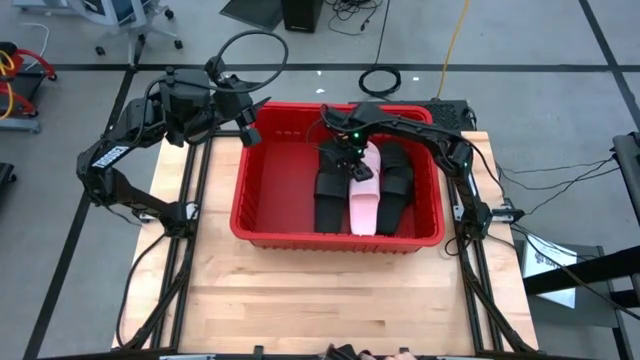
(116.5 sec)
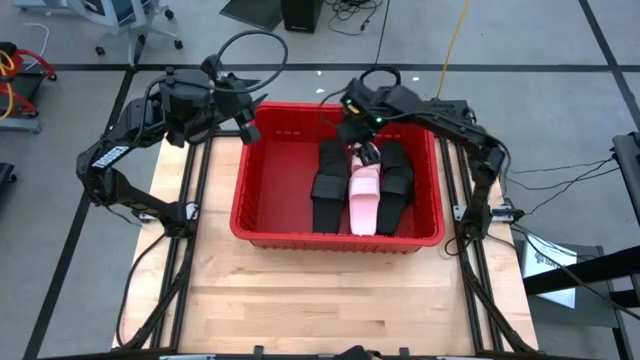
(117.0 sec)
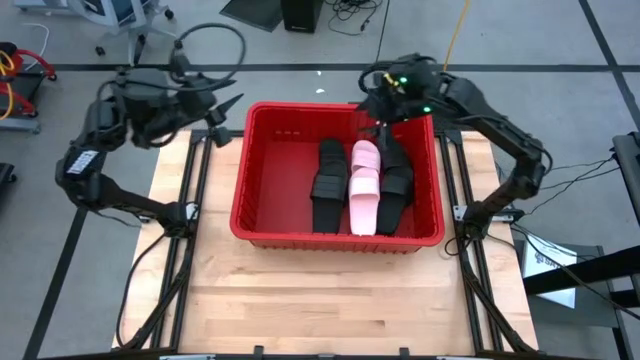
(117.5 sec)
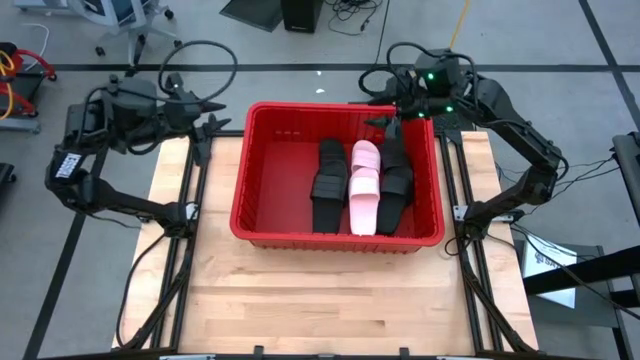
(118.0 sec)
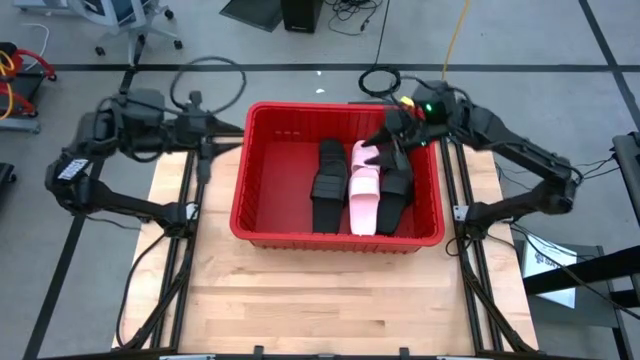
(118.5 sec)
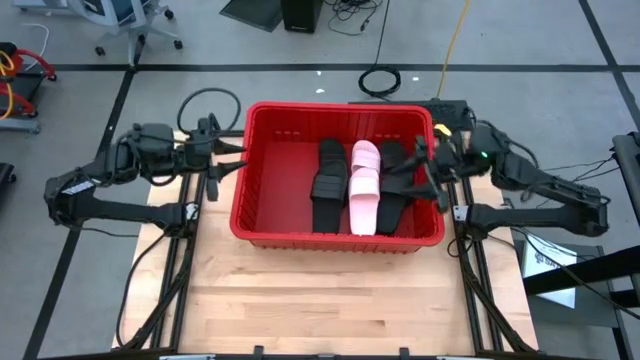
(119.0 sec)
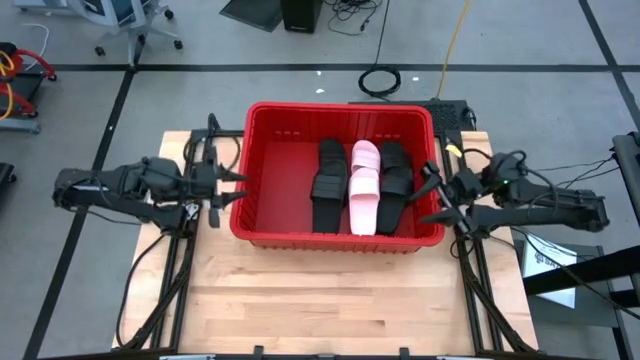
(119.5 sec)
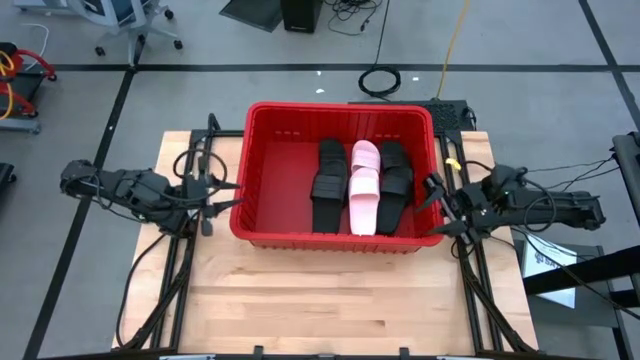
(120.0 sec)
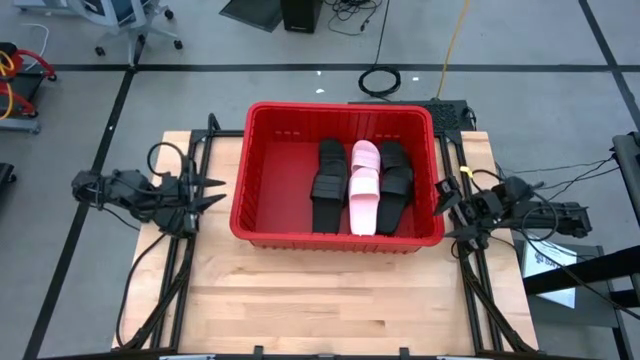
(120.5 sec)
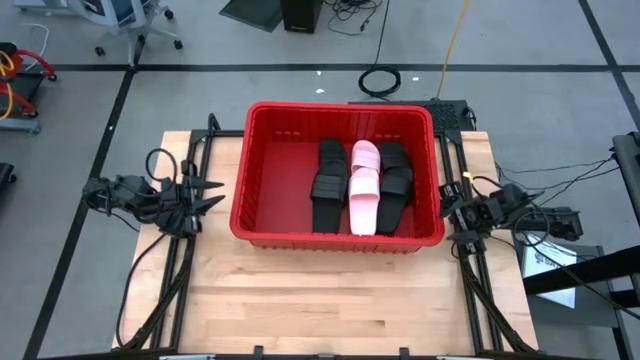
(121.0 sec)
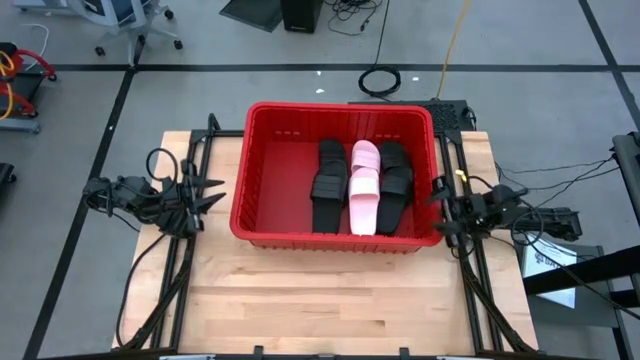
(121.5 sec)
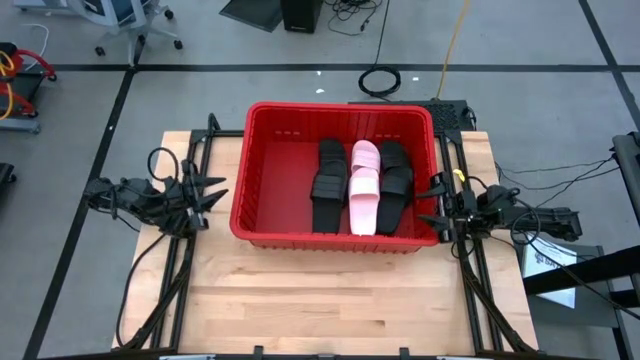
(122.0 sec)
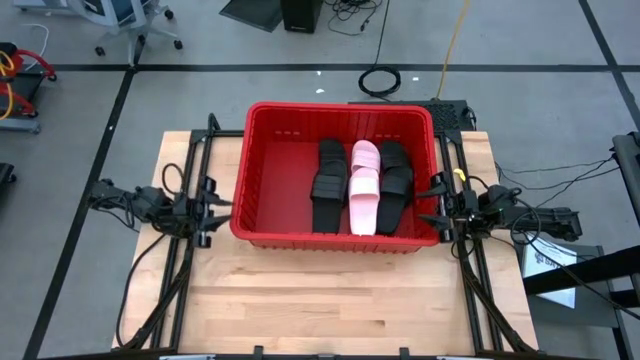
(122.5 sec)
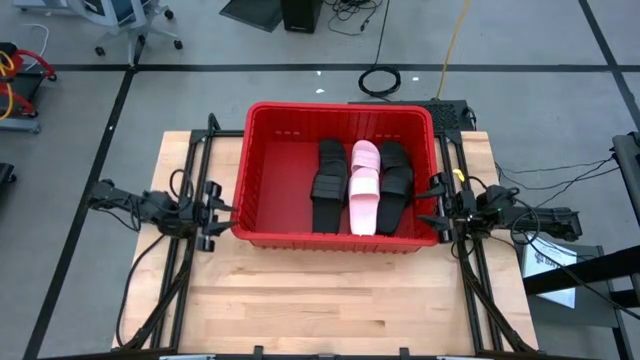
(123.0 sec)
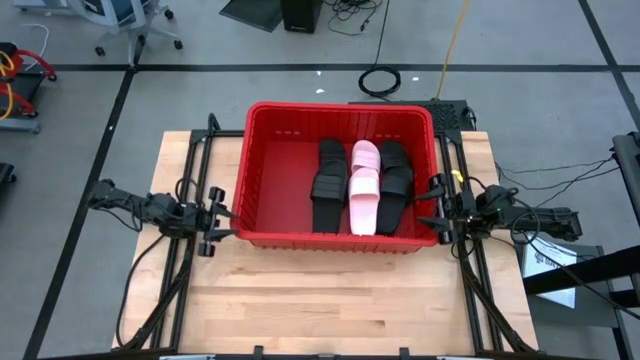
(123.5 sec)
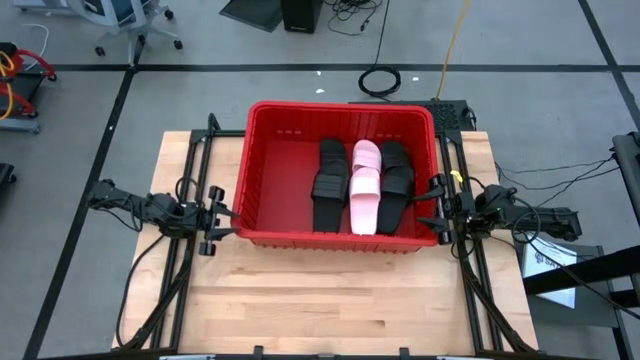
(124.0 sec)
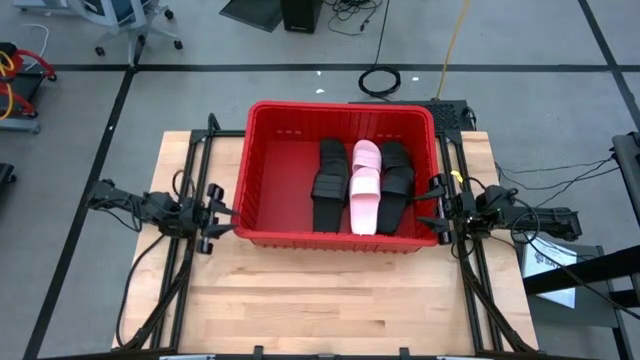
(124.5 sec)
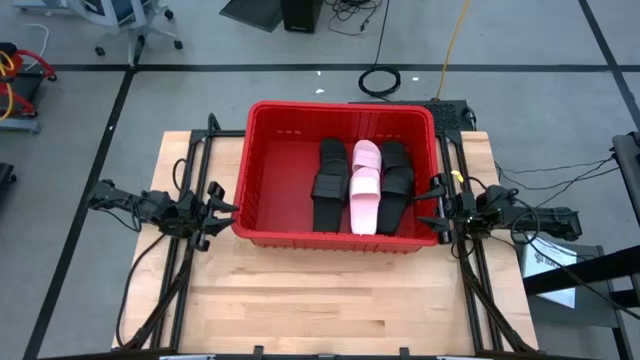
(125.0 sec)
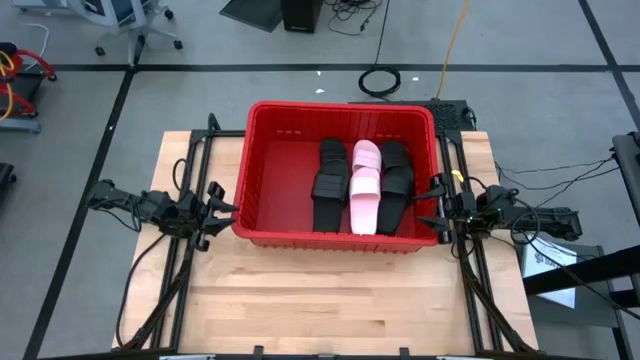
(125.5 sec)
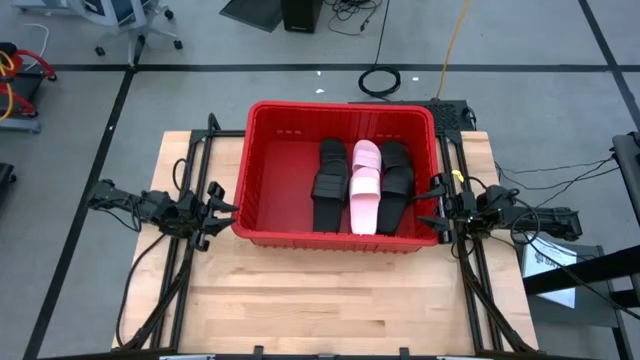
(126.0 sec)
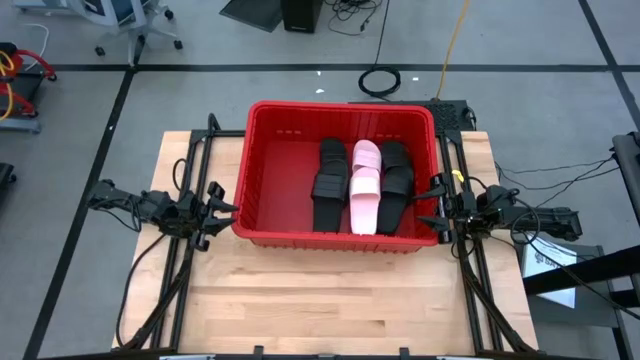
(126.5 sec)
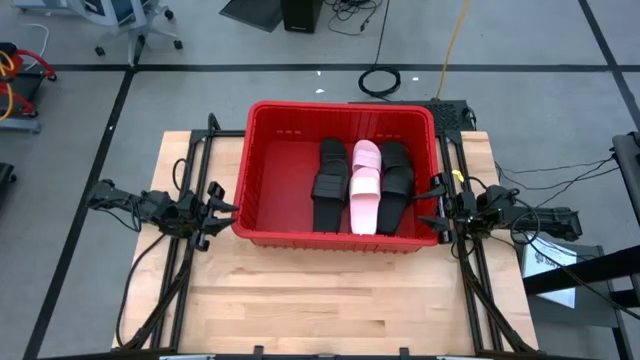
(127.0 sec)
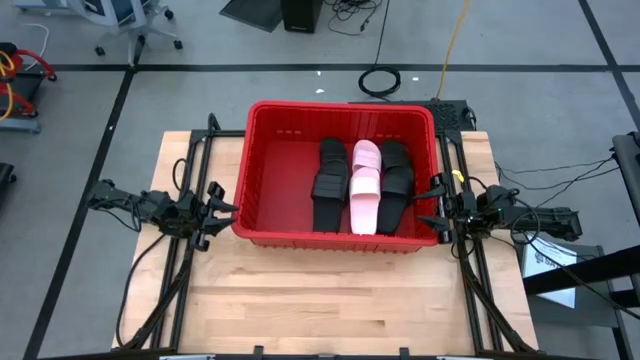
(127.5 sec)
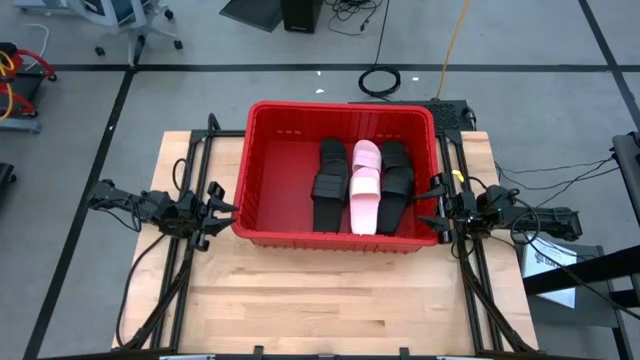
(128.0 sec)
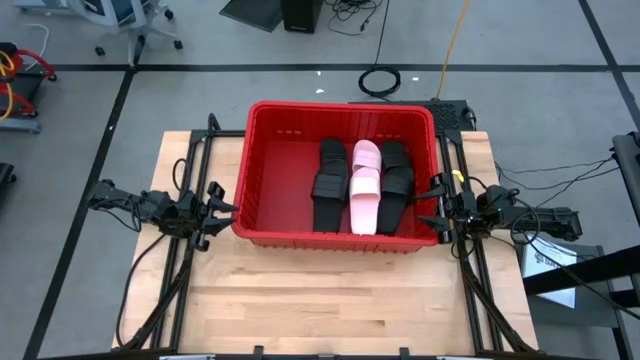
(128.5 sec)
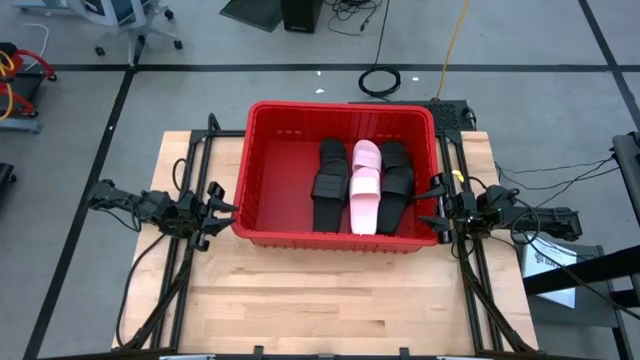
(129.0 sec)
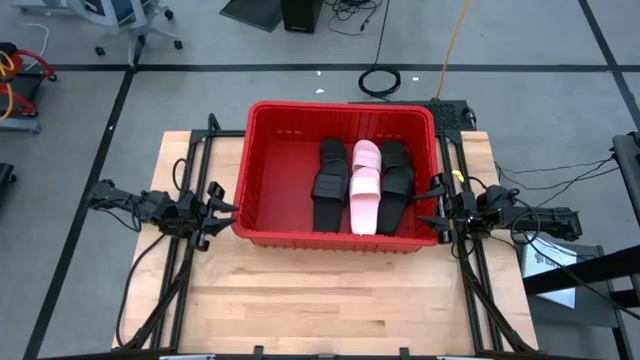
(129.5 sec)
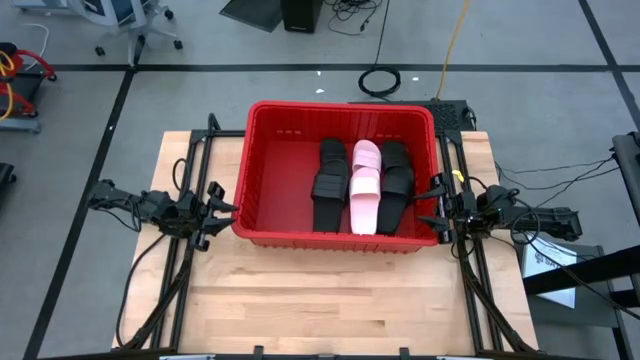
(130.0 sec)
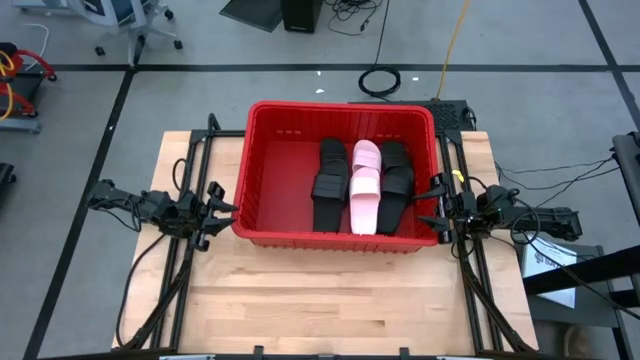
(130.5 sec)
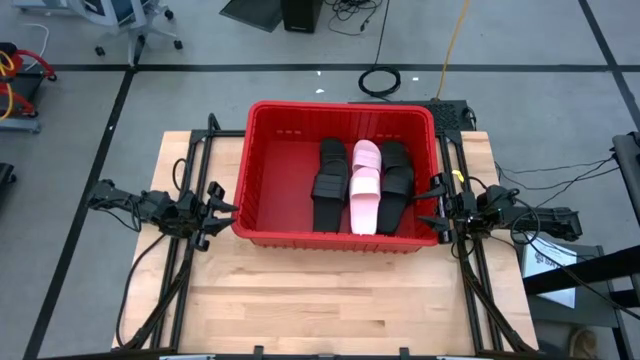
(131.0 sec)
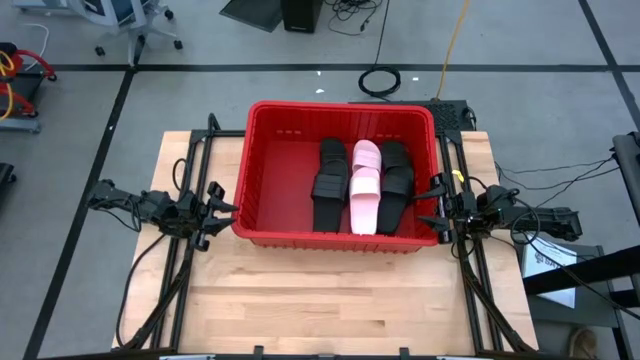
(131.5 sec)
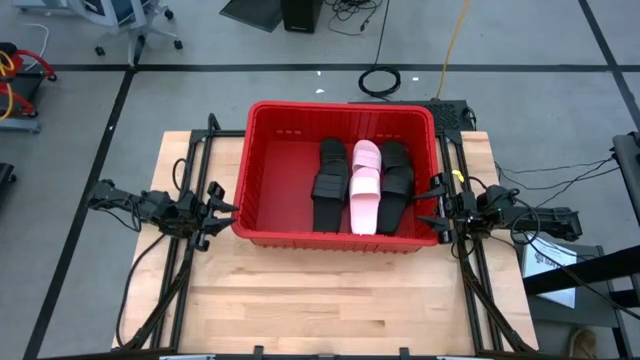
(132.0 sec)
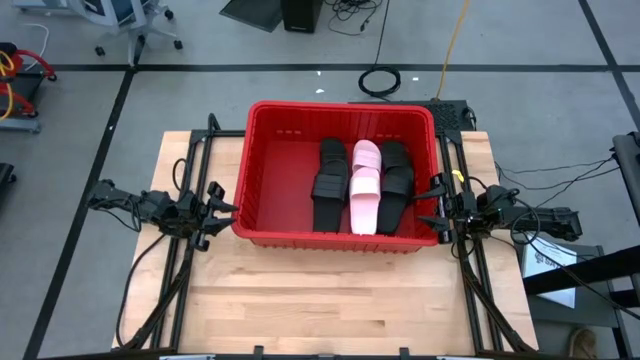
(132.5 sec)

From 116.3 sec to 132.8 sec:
Task: Pick and place slides into bin
Return to Home Position
